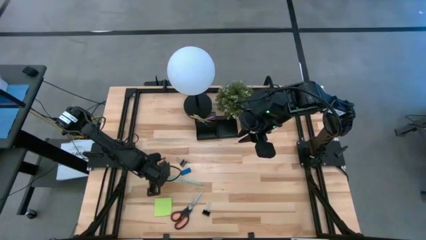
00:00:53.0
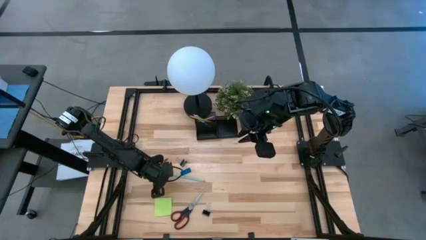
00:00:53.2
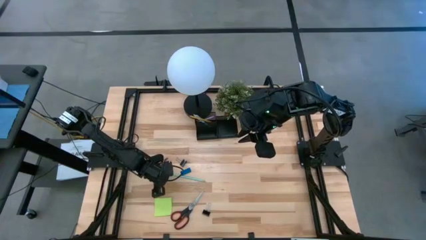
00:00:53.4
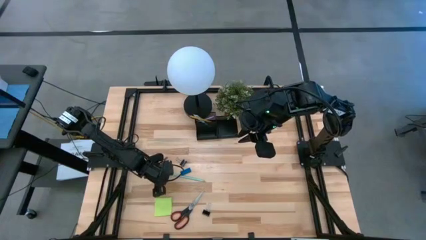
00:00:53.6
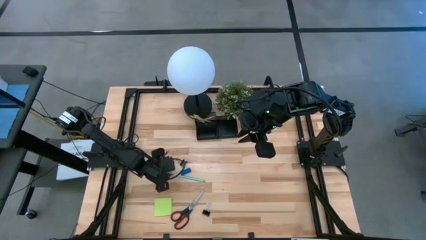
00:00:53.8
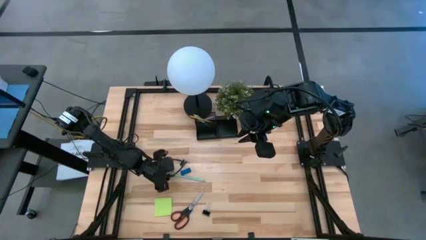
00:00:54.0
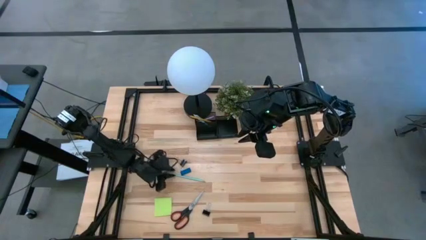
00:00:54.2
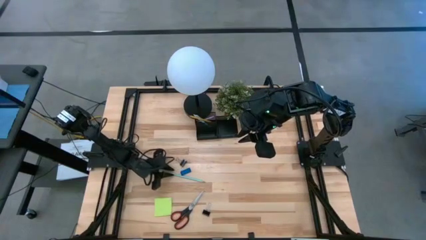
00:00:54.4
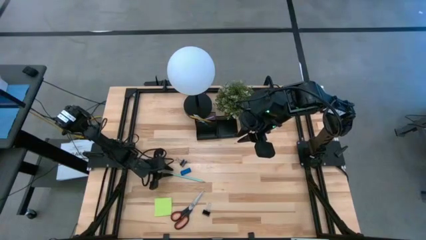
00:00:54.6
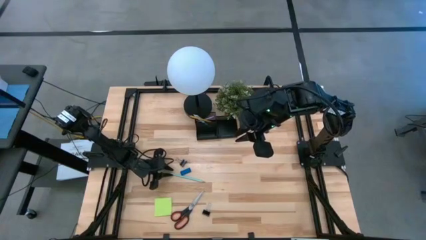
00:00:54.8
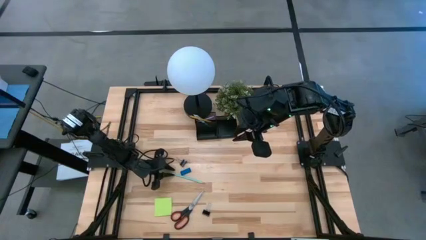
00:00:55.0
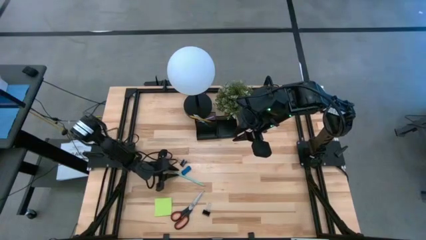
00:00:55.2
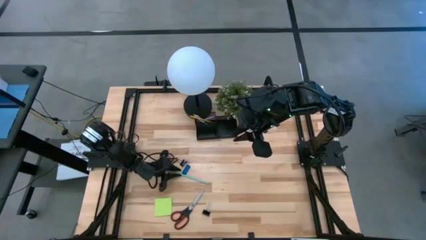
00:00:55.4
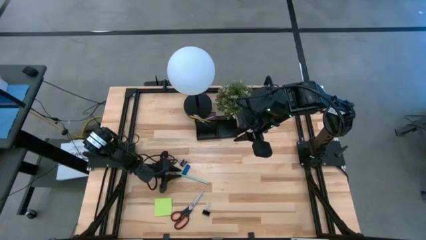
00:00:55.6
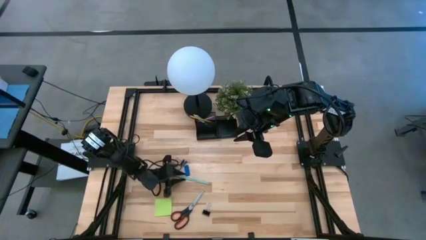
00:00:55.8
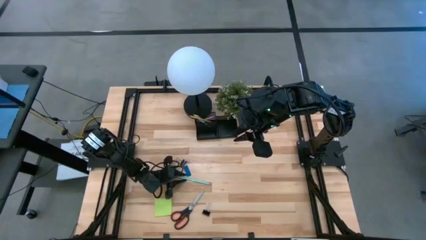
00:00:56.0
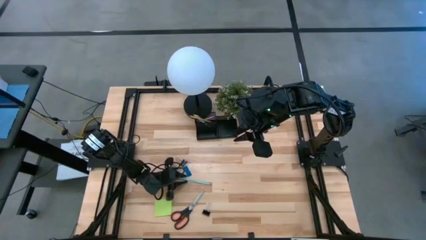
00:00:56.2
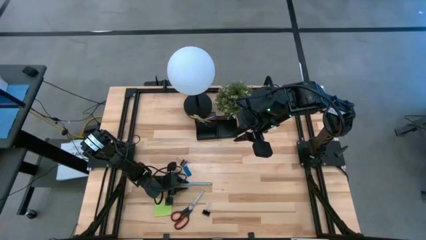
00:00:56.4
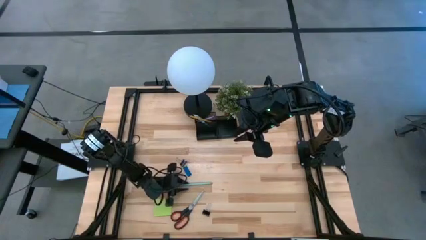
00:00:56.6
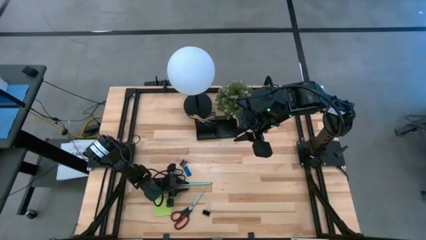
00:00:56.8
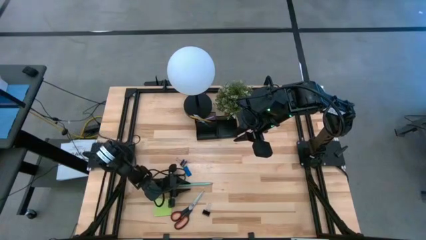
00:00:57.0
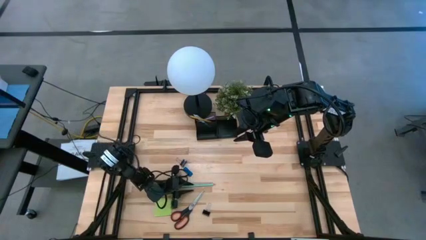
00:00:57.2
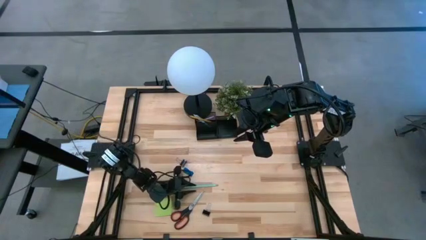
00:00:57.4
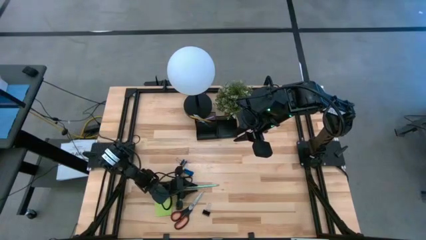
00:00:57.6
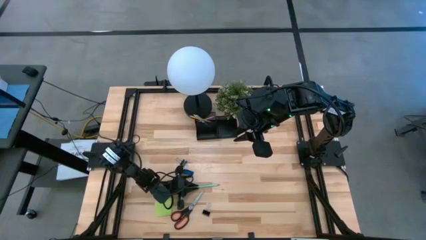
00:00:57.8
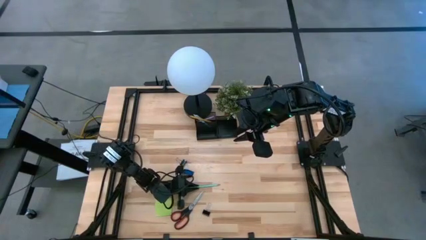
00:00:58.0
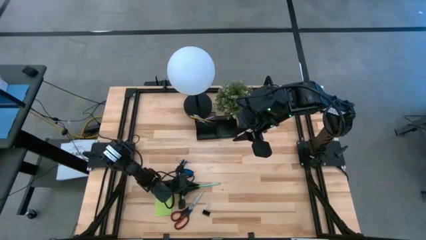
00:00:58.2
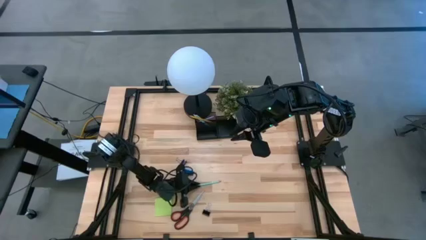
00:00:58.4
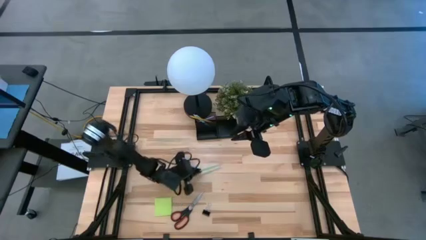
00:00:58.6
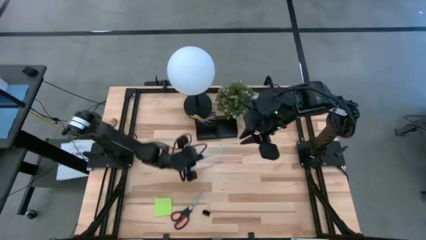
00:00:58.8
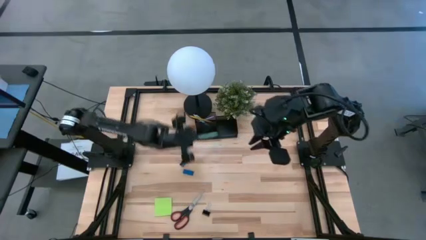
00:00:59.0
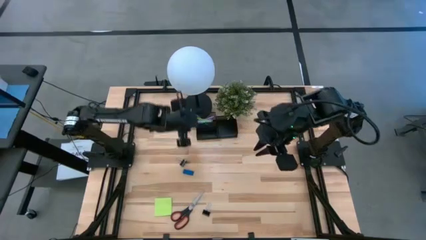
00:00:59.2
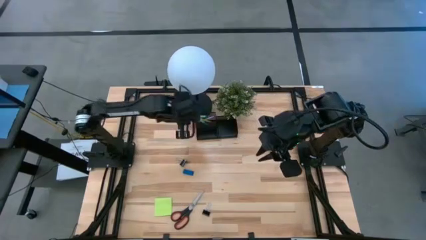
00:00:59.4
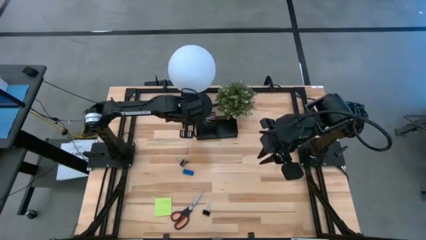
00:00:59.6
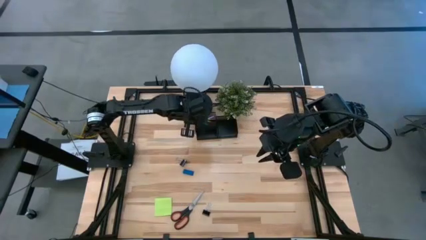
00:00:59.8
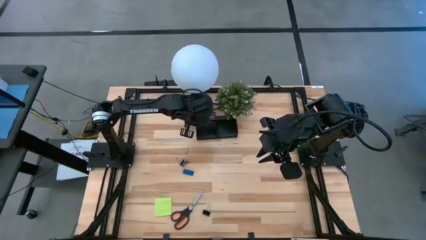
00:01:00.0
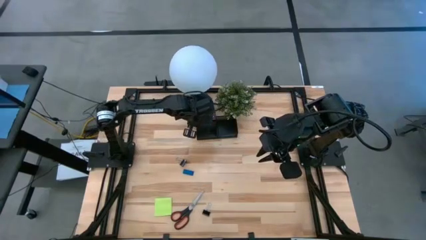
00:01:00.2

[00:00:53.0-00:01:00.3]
Task: Pick and place office supplies into organizer
Put the blue pencil into the black desk organizer

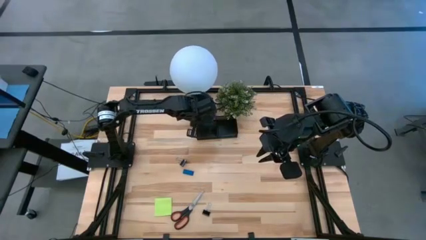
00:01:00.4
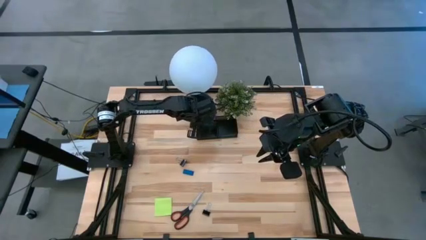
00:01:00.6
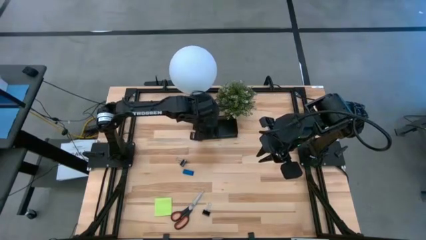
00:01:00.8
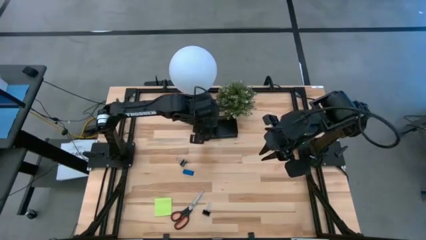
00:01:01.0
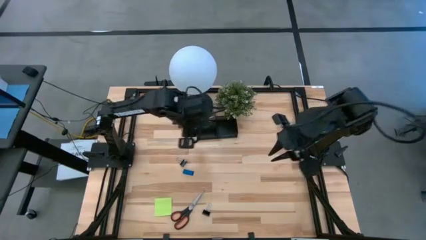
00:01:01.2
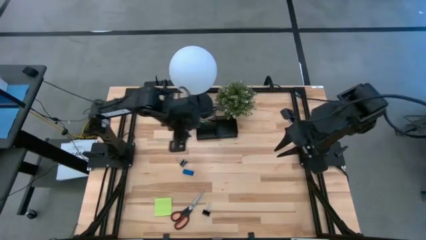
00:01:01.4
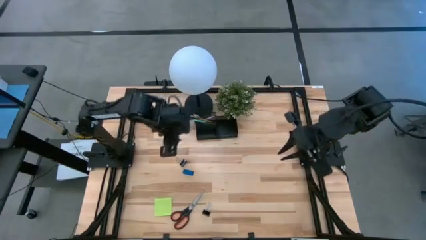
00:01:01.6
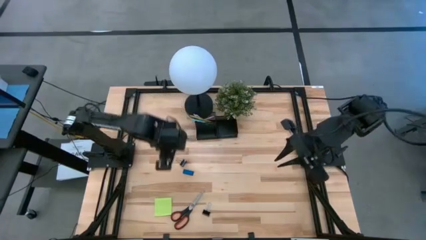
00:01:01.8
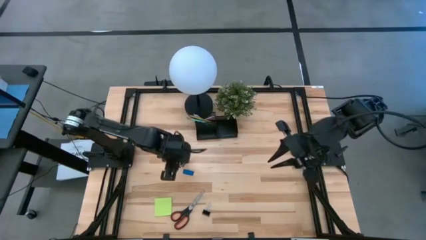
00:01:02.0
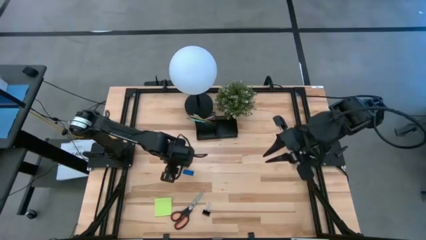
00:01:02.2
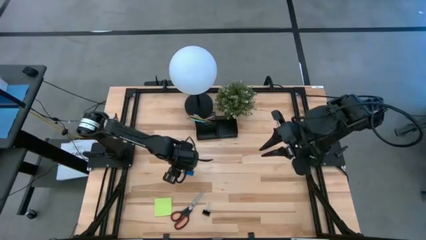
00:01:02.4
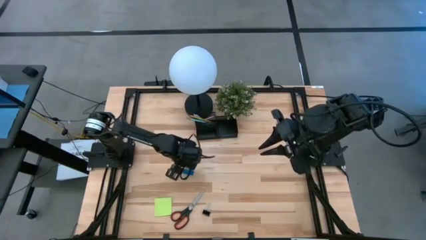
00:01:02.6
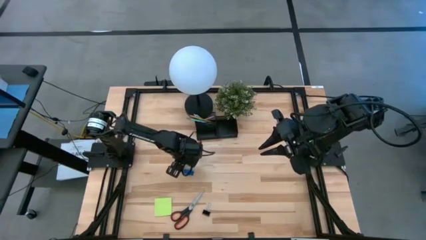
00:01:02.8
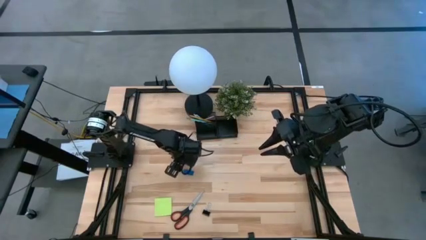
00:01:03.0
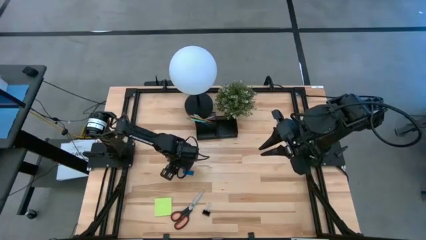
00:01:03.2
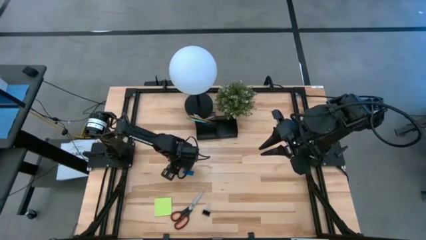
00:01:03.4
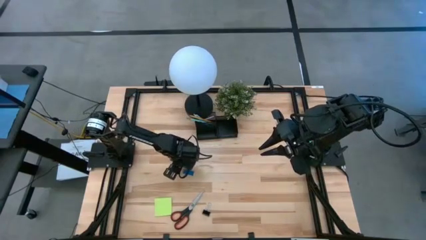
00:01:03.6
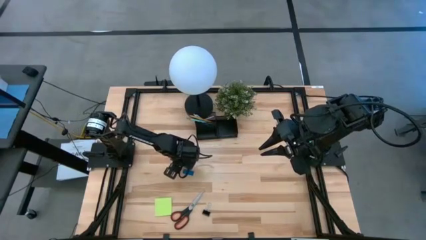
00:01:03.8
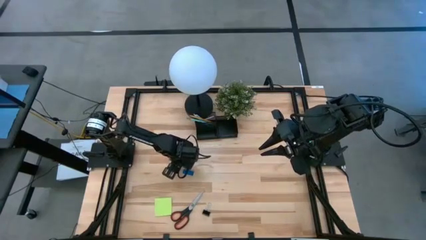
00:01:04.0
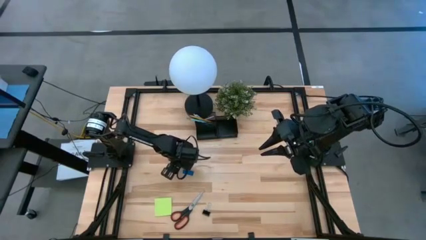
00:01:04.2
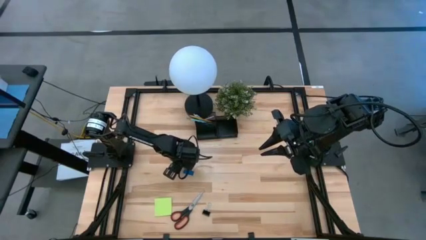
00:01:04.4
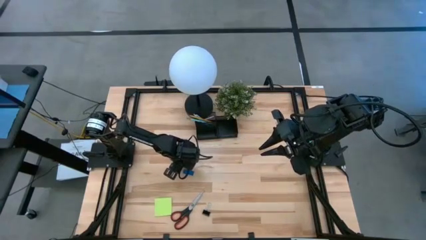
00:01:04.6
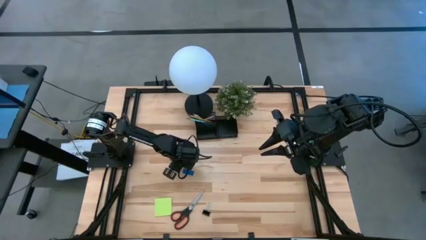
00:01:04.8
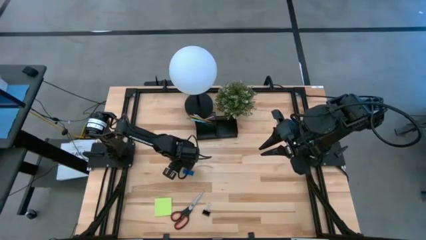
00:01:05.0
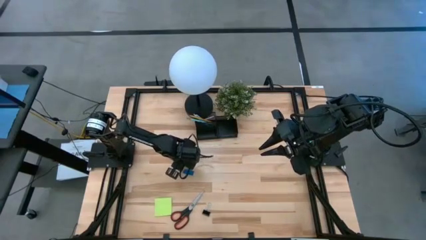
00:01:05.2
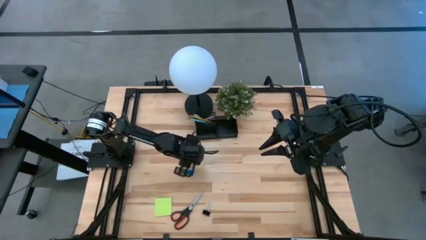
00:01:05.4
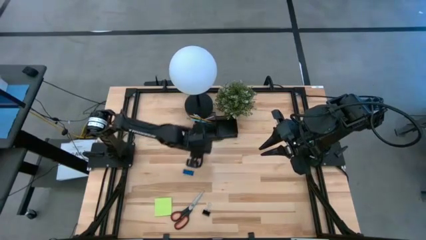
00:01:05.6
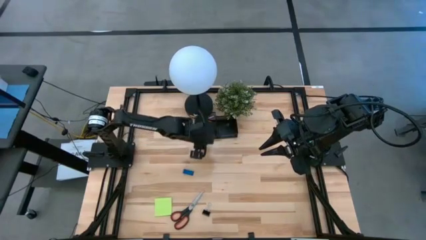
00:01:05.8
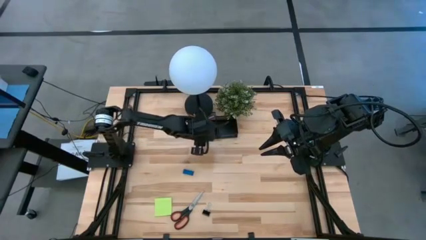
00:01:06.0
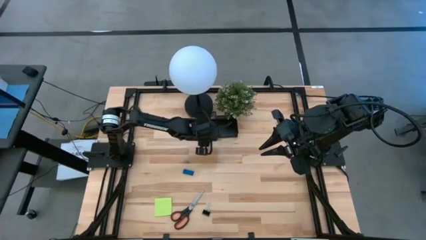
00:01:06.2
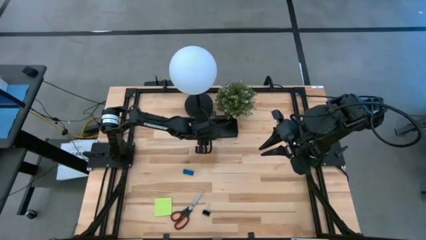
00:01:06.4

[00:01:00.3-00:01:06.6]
Put the top black binder clip into the black desk organizer

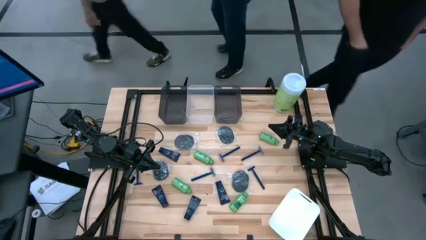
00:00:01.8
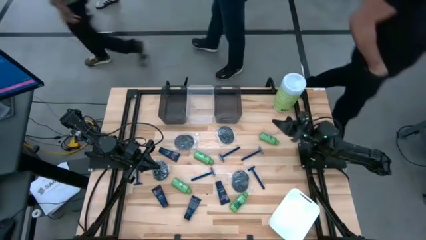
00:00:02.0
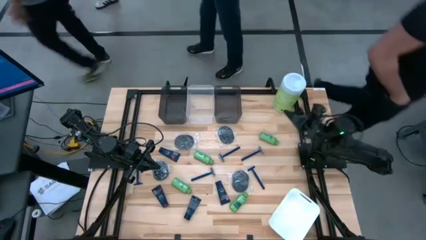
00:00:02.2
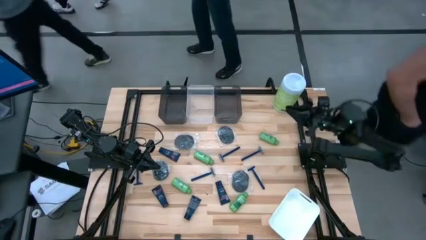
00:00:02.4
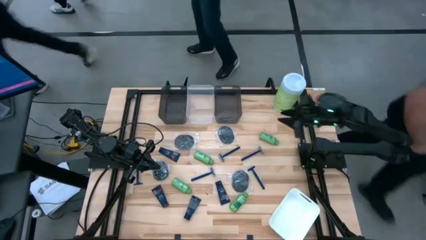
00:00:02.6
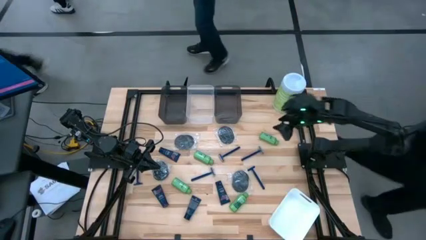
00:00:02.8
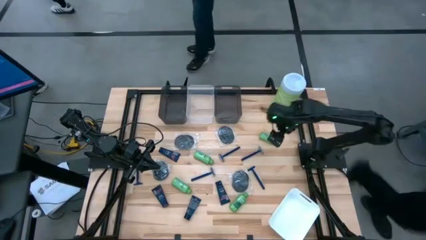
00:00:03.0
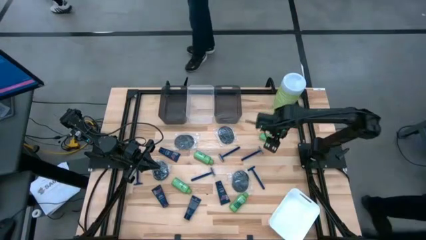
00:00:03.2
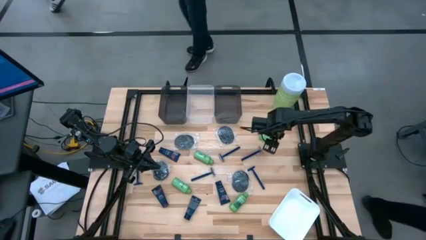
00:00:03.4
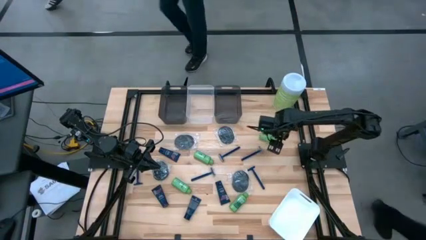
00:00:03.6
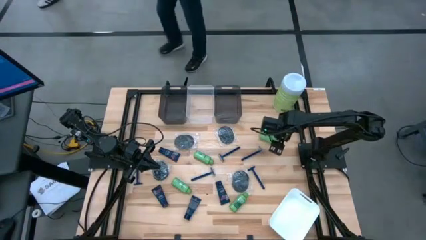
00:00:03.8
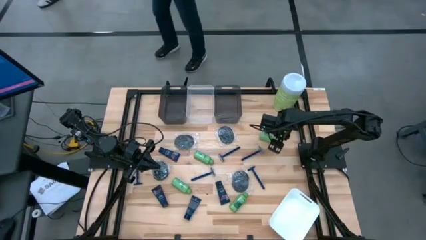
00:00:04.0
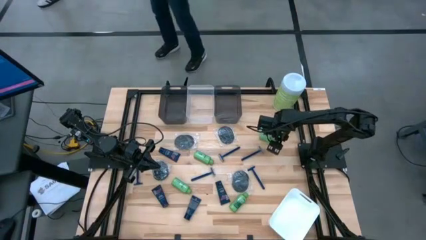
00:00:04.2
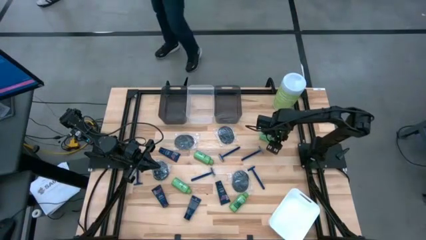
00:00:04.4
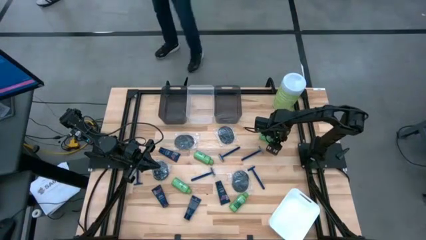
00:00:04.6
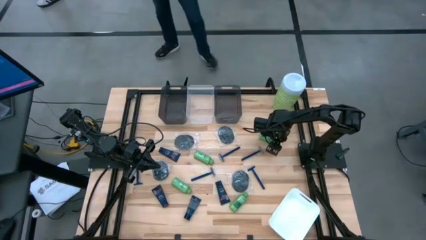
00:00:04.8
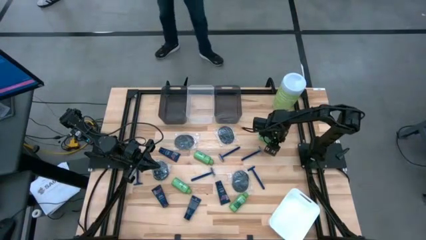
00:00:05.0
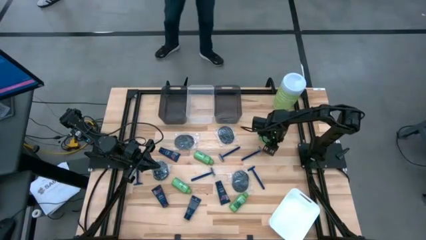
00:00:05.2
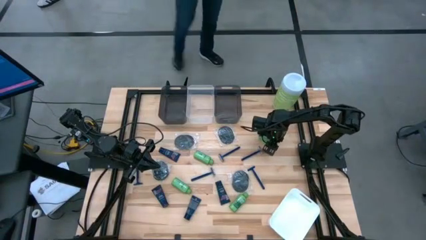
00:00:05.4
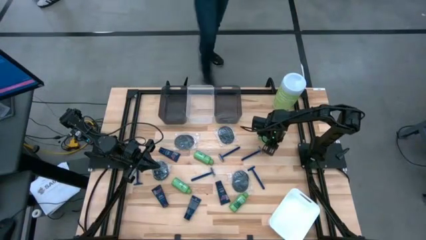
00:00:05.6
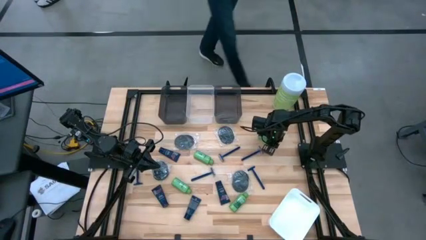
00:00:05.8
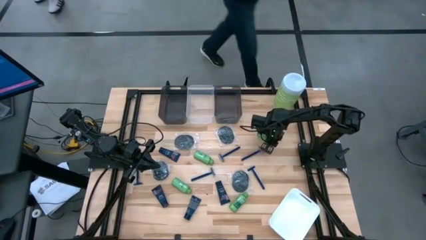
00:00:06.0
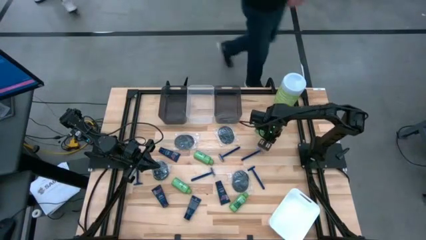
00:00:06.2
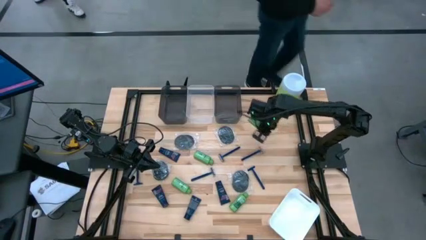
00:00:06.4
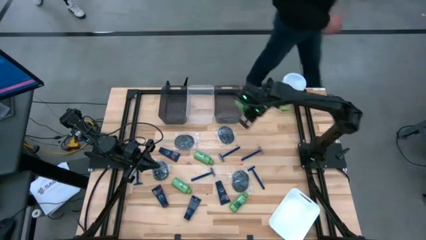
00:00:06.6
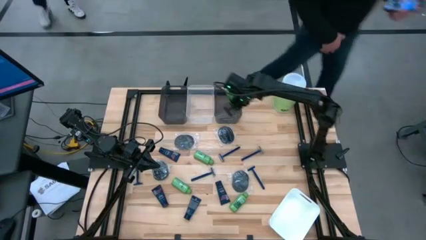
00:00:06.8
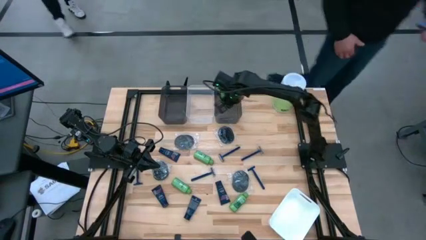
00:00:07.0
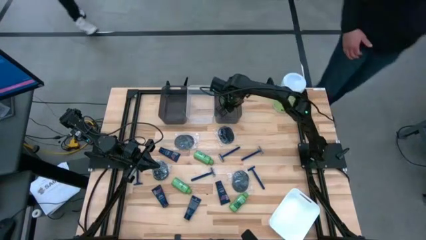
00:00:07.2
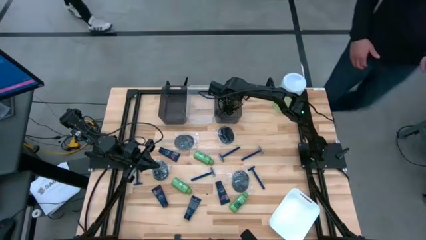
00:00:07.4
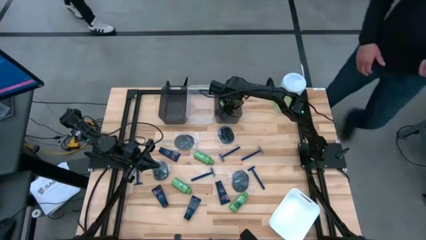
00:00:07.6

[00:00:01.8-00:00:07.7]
Task: Pick & Place Travel size toiletries
Put the green shampoo bottle into the right black bin
